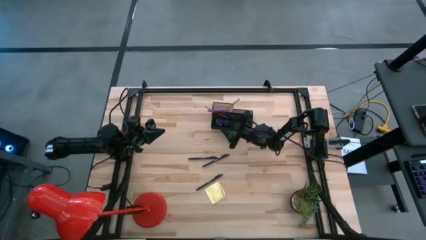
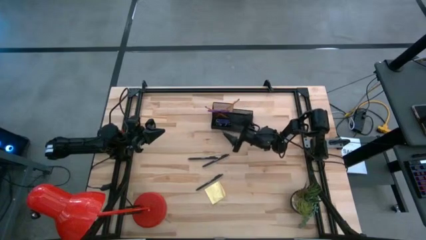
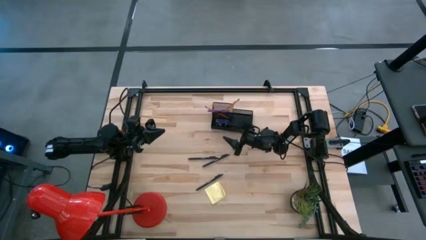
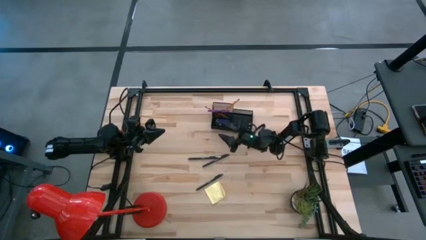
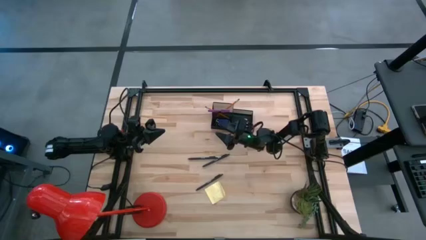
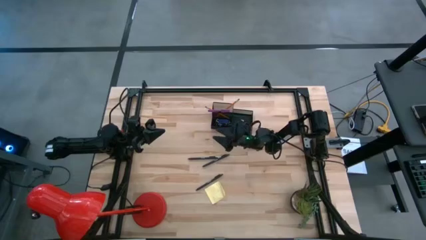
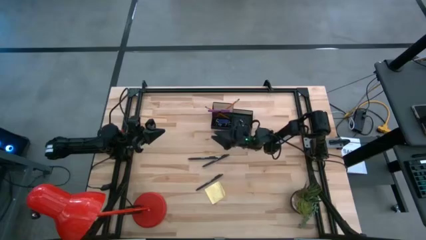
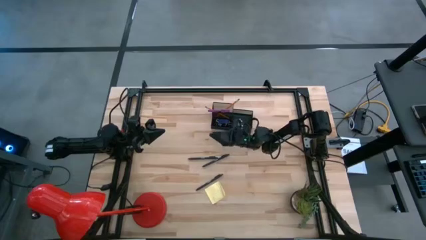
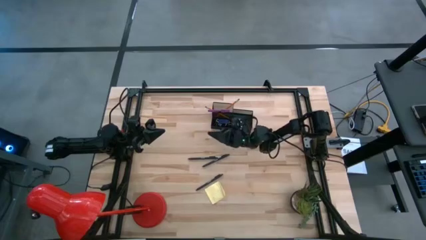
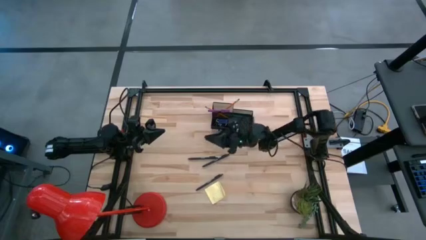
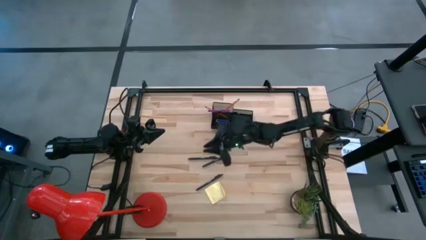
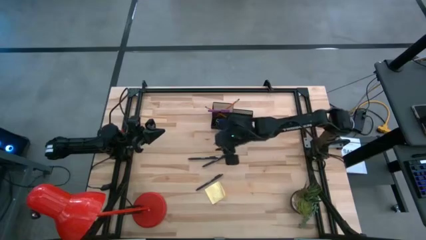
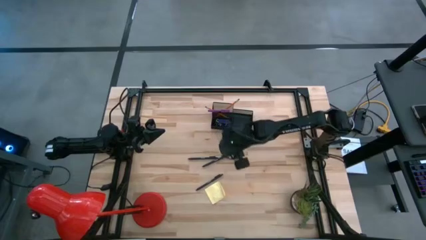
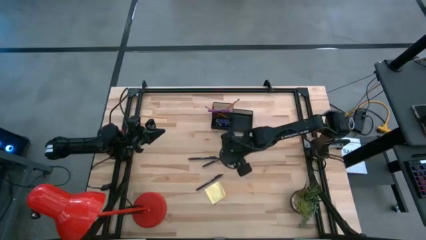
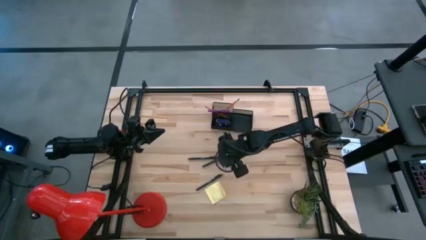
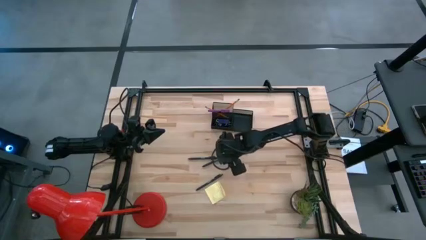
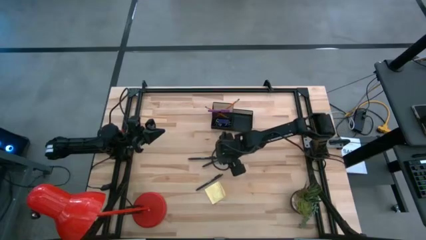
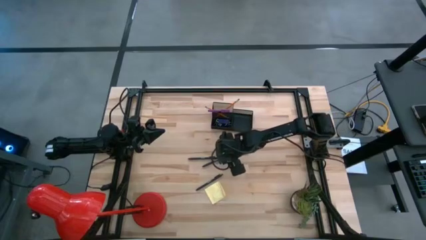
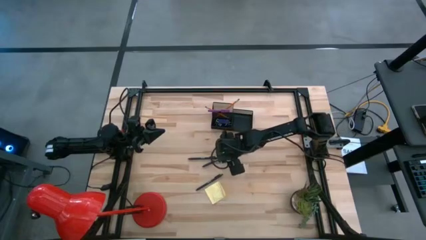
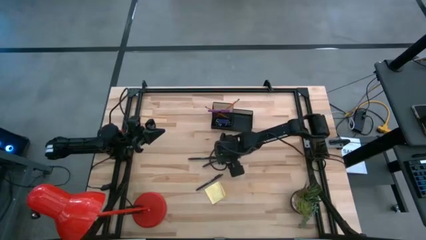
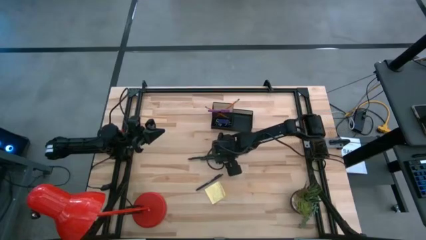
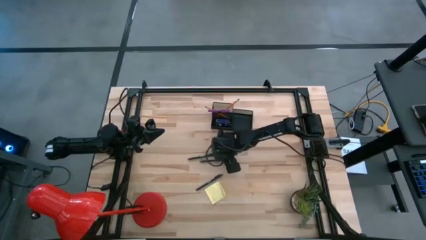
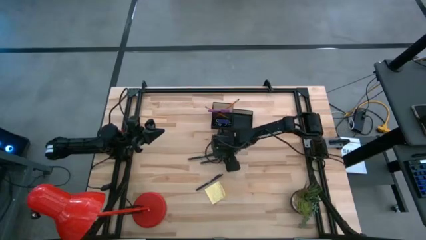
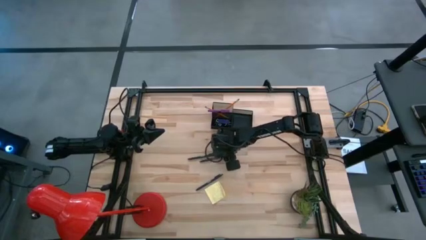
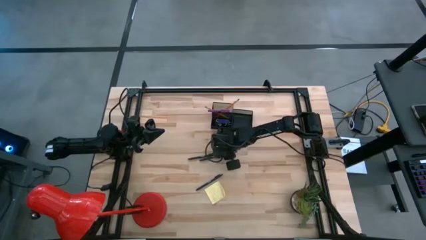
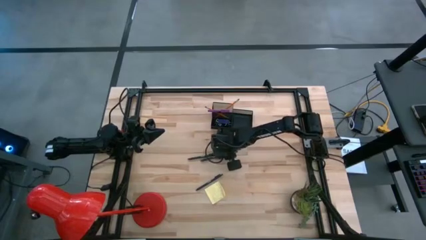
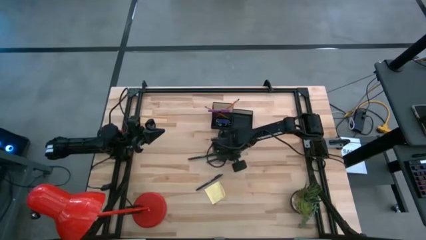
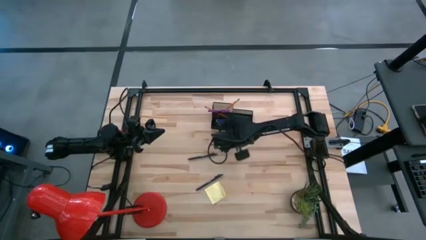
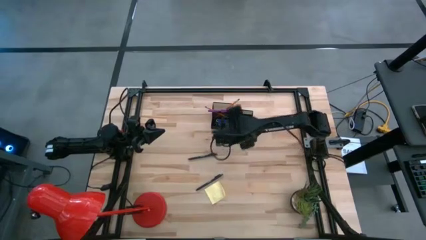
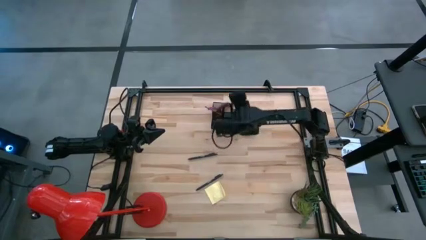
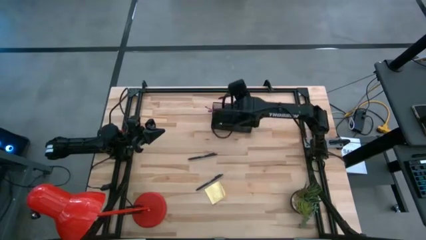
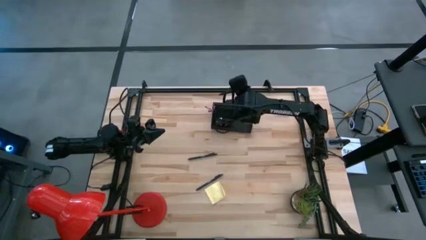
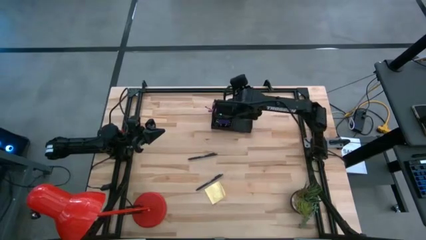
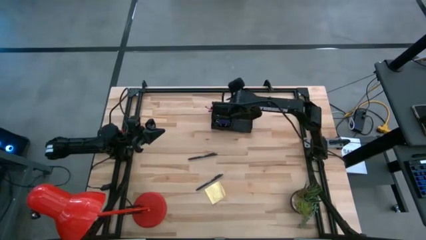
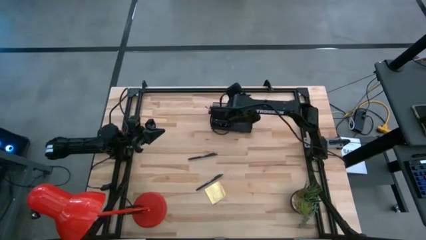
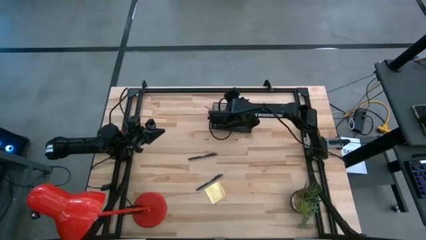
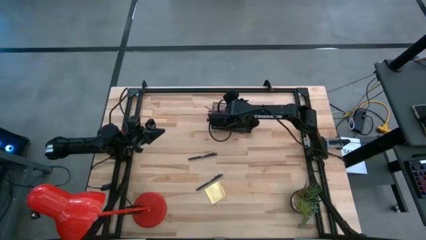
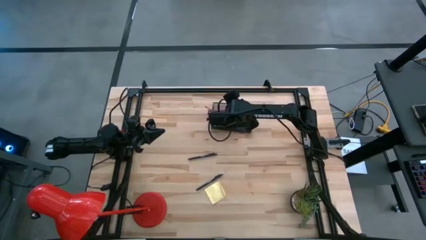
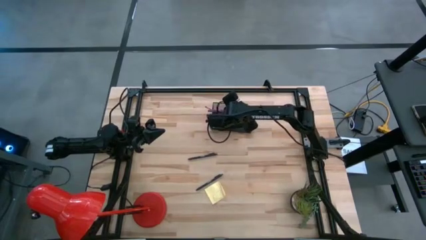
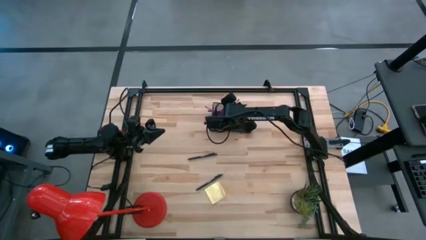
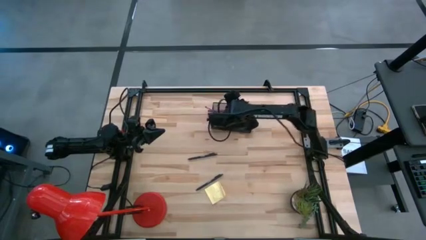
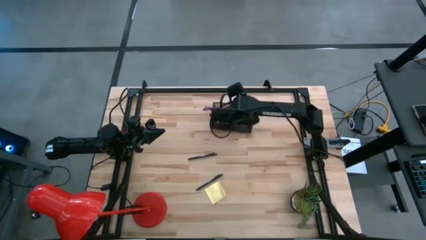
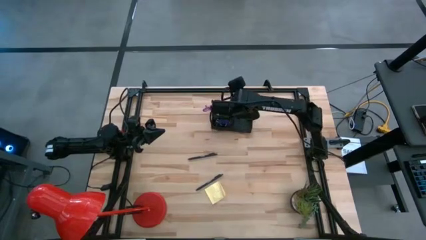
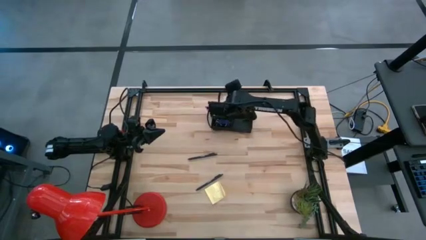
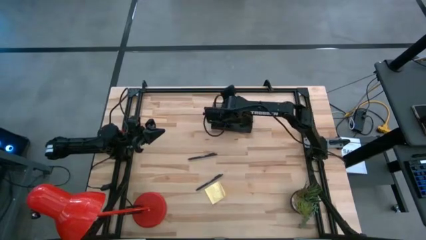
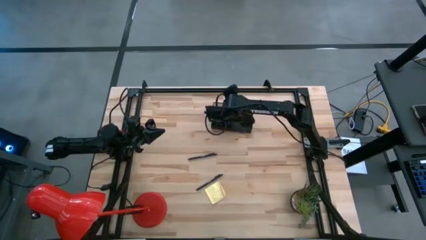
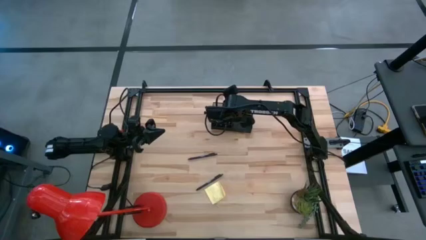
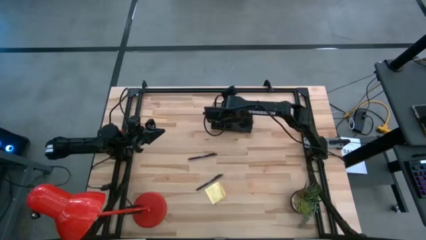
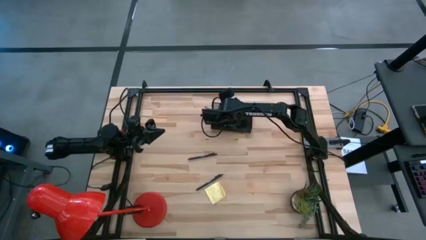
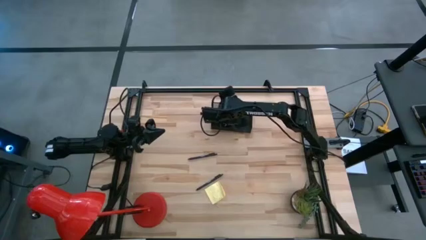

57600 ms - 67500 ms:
Task: Pick and place office supplies into organizer
Put the middle black pen into the desk organizer

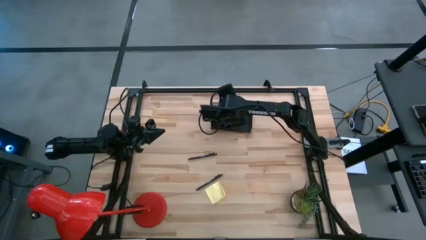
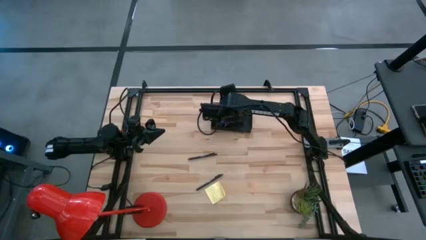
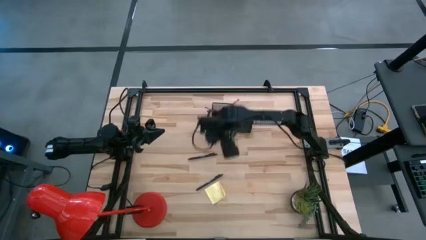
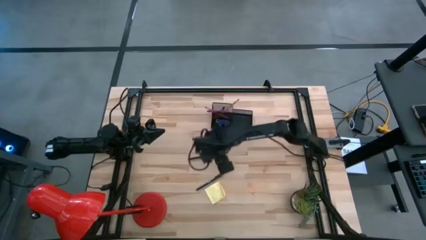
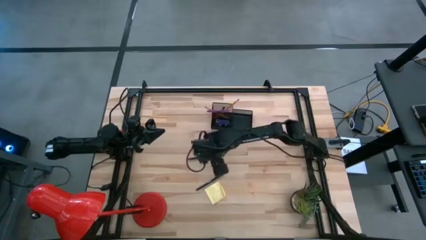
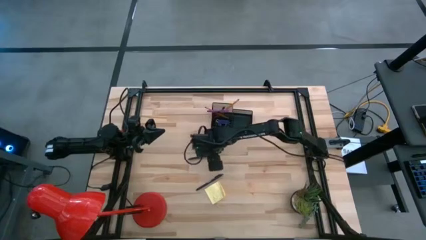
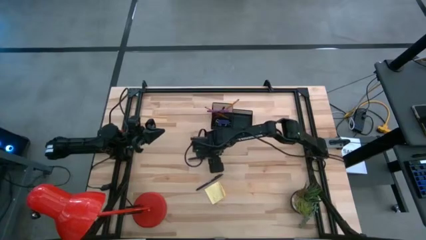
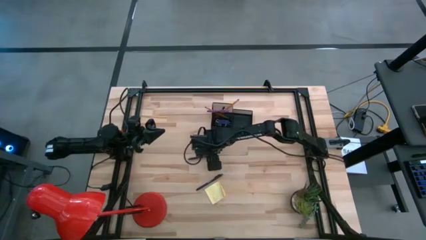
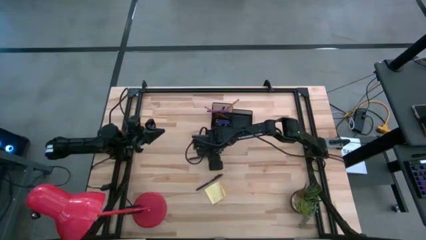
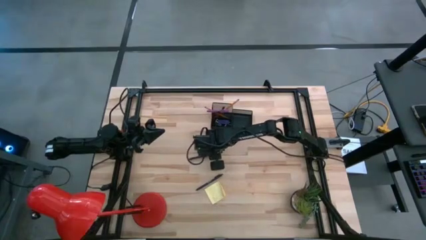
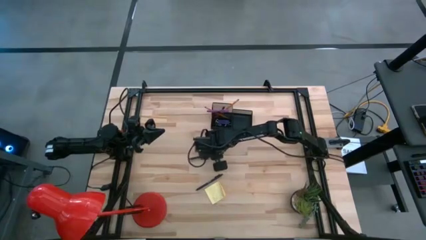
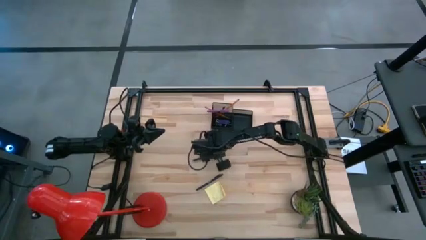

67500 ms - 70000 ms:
Put the top black pen into the desk organizer

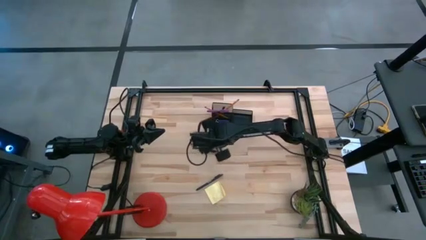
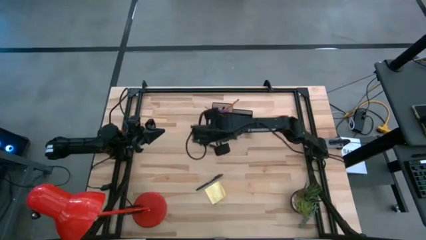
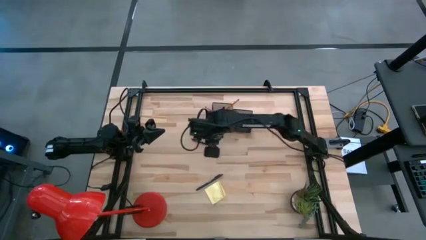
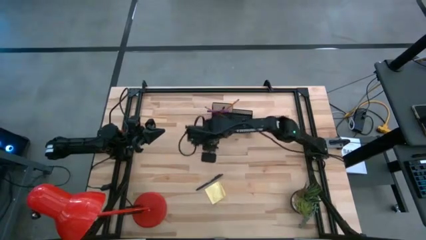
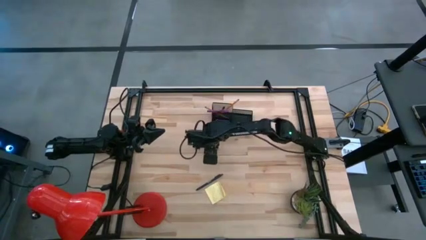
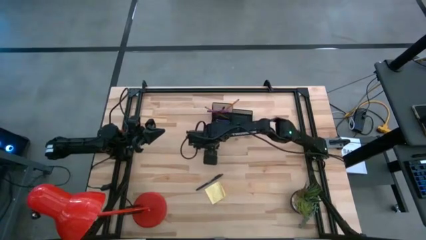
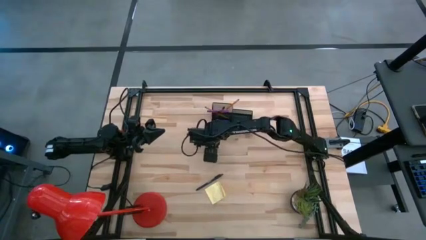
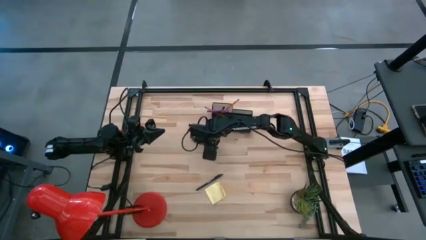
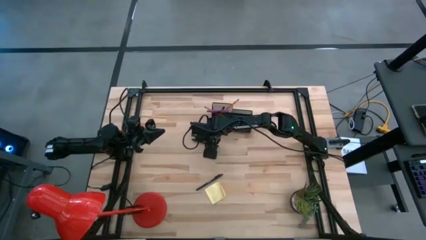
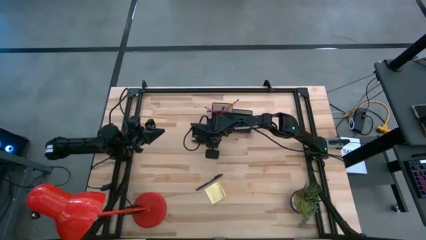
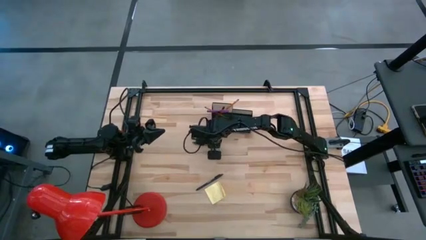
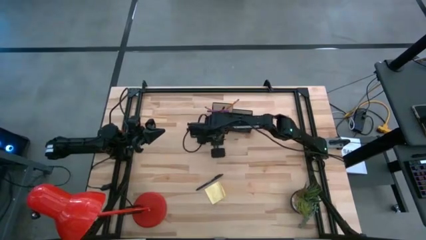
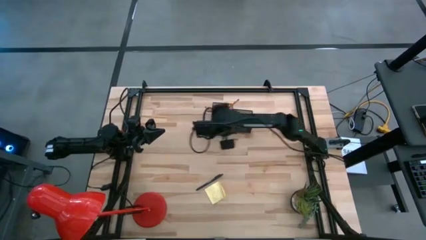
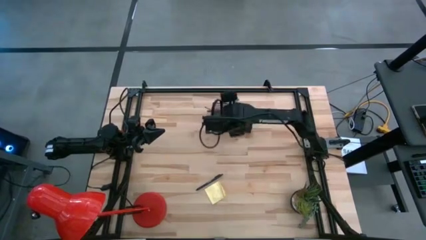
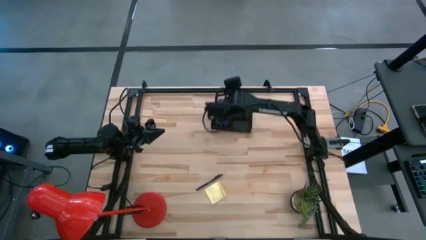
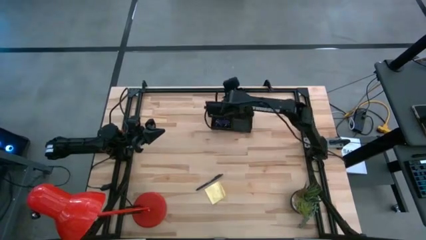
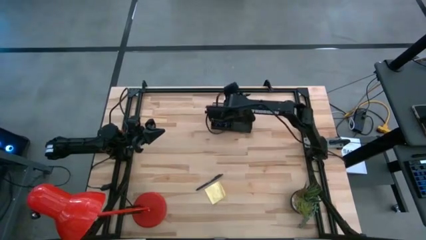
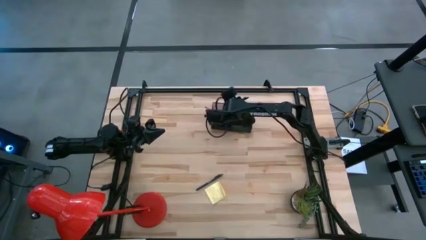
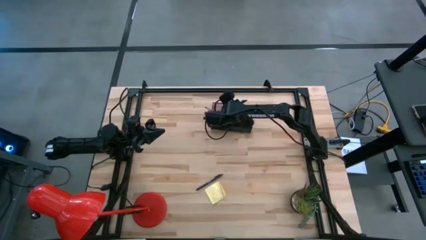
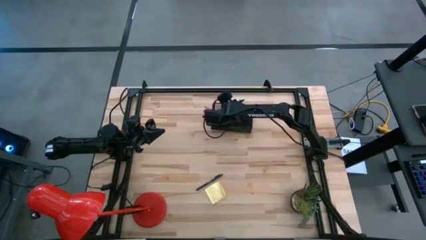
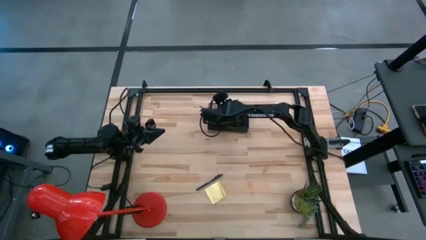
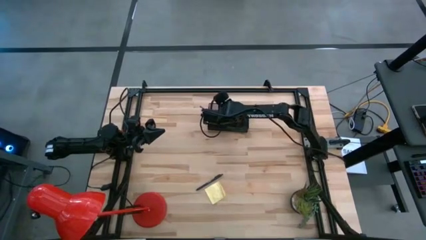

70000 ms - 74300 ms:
Put the top black pen into the desk organizer

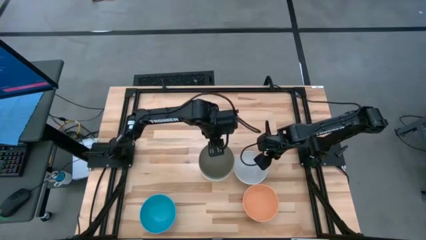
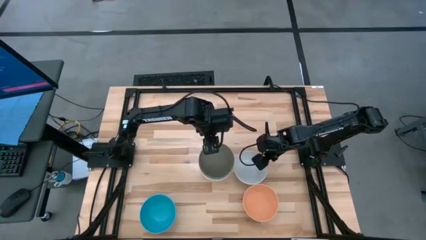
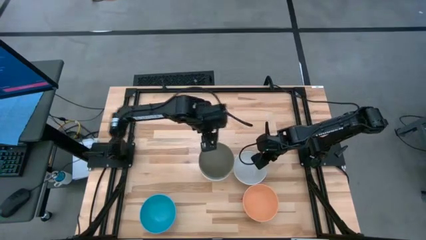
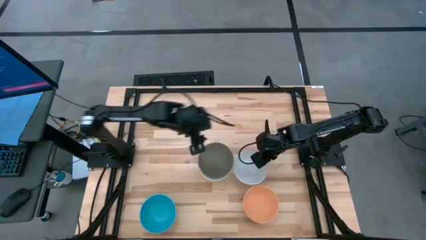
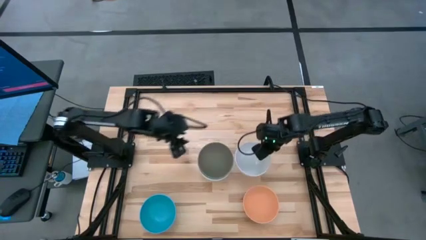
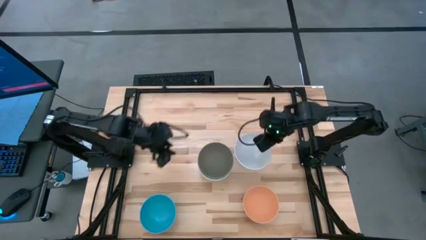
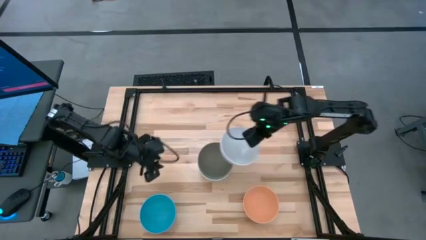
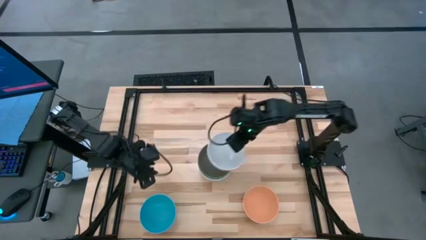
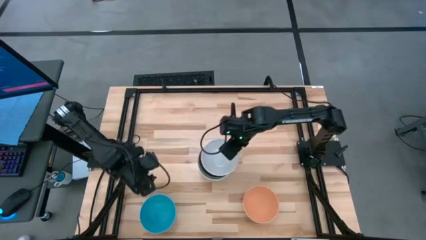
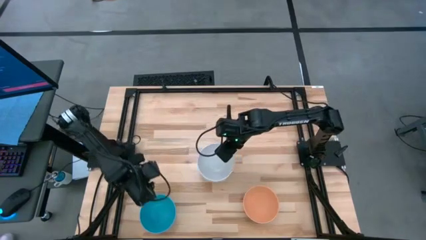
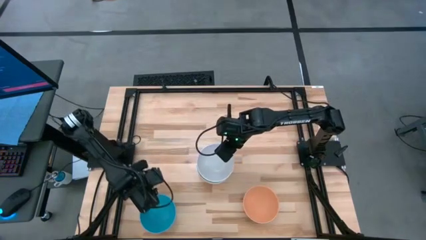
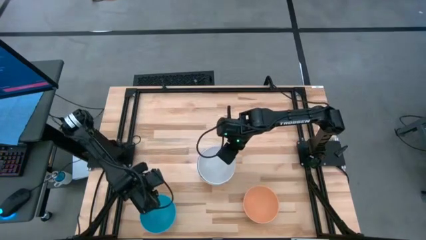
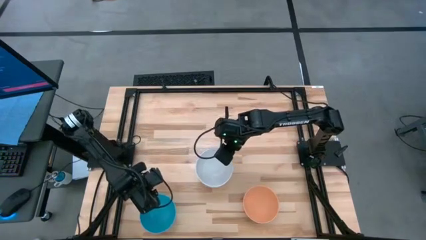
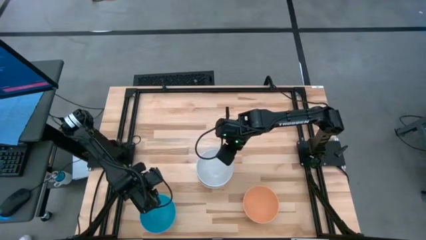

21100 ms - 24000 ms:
Task: Nest bowls inside each other
Stack the white bowl on top of the gray bowl
